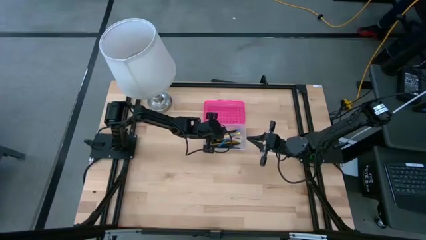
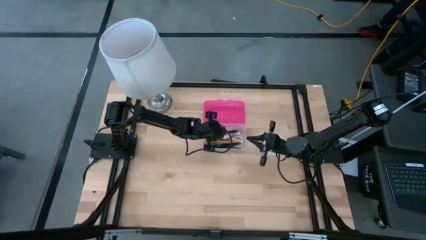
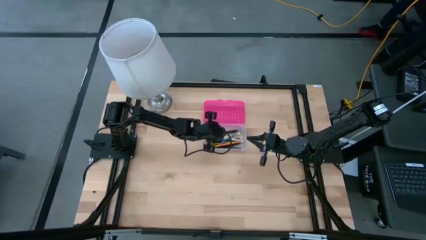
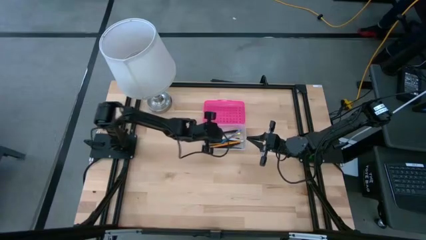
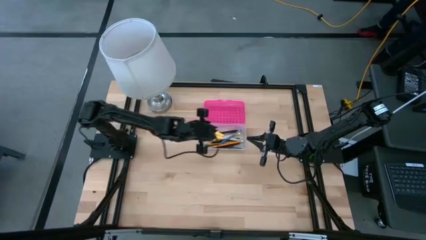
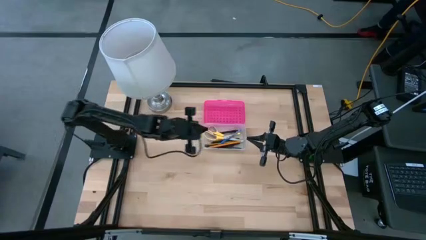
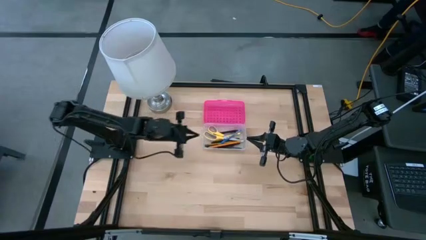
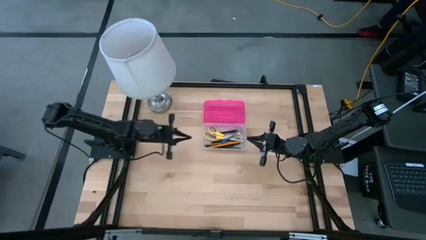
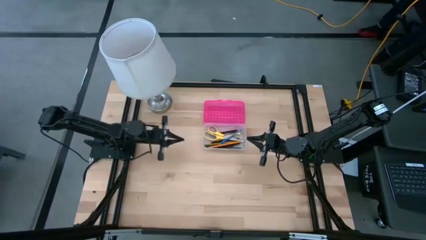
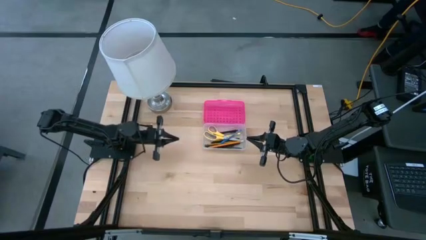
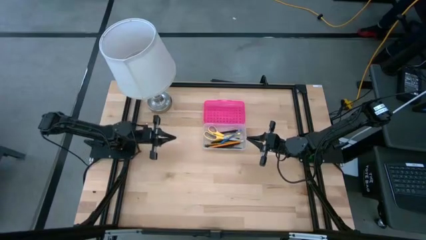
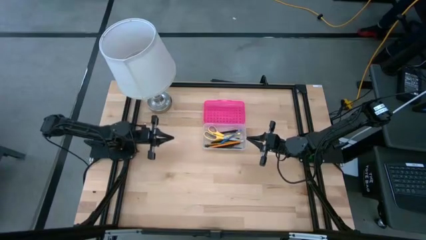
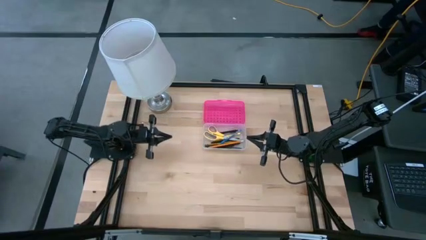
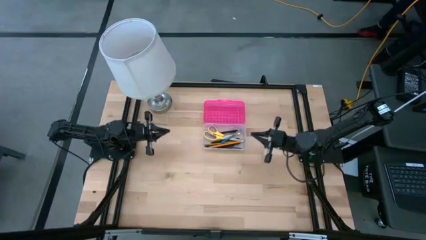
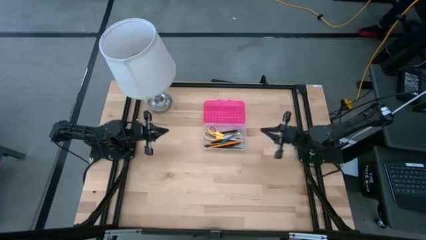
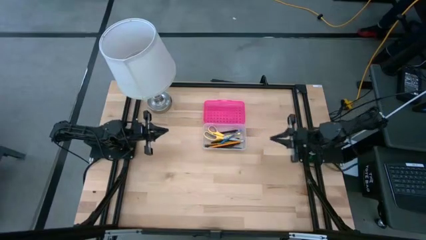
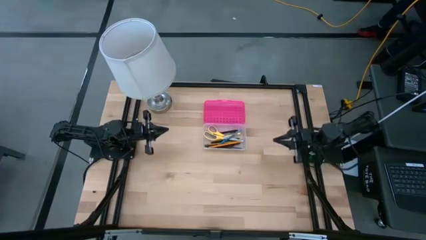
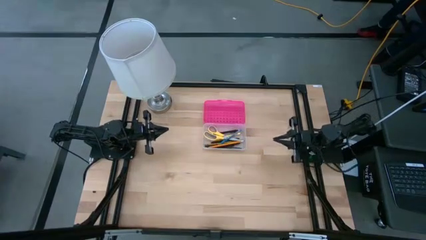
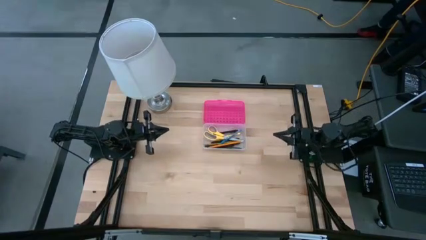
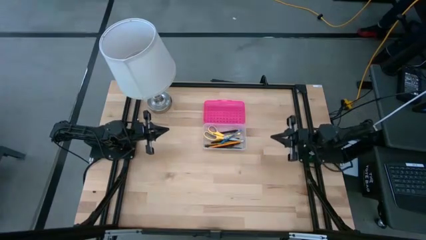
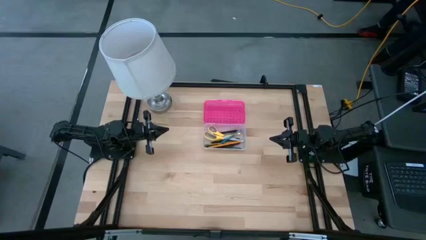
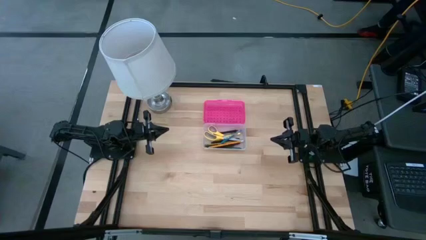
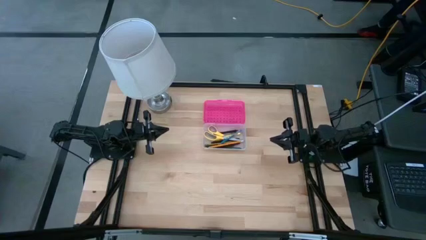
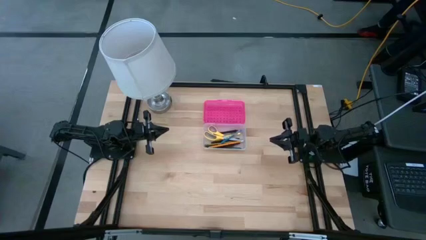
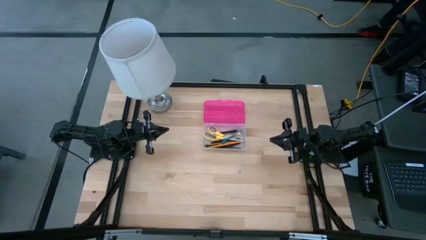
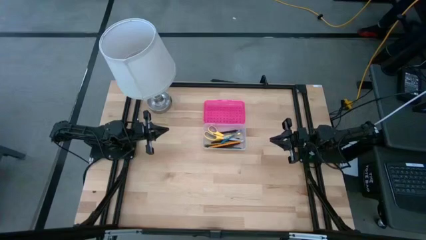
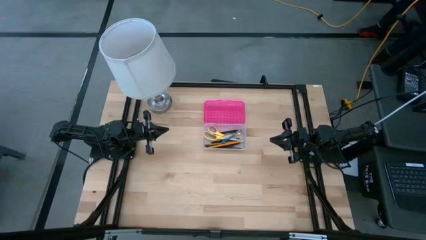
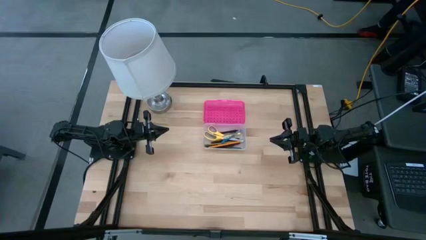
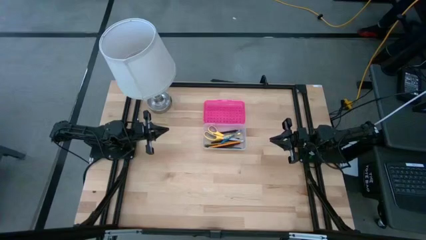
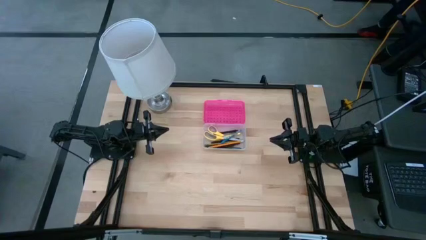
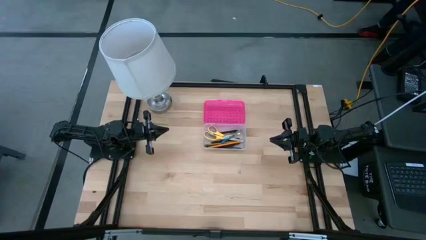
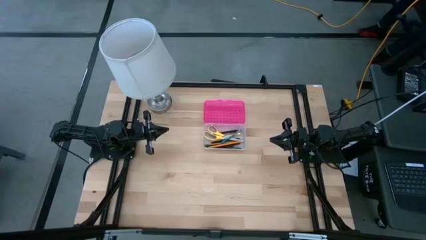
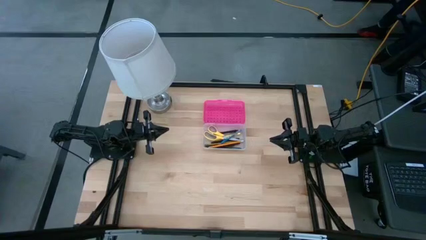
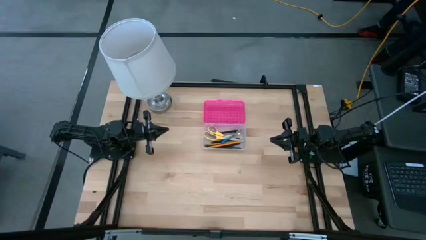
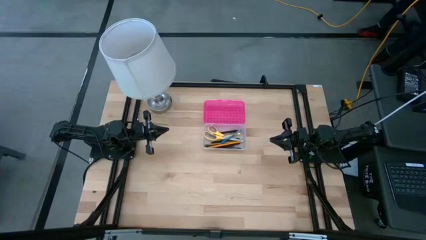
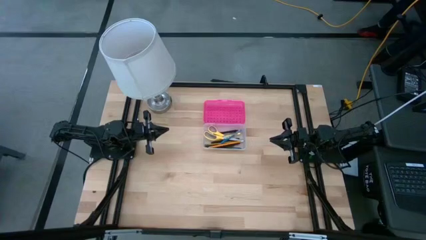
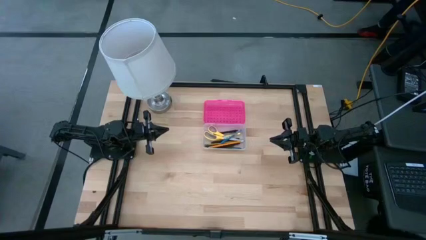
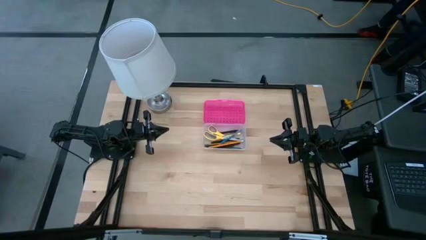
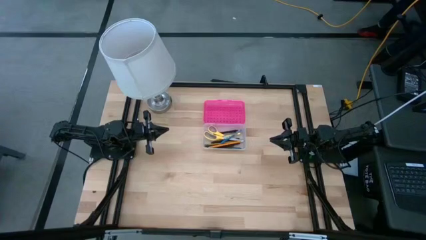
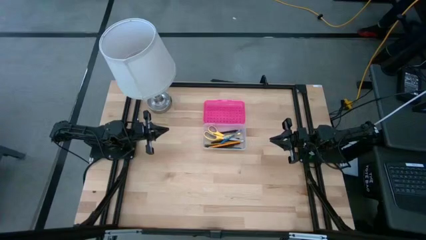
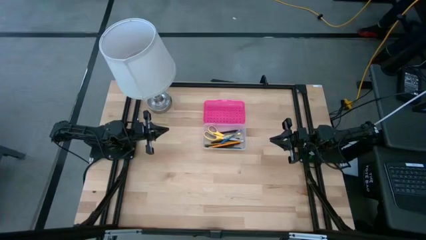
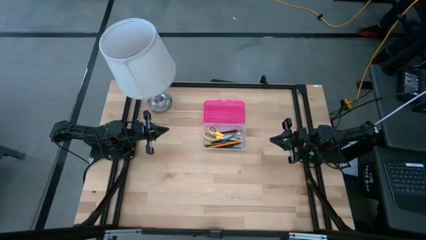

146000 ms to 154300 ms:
Task: Pick & place school supplies into a supply box
Return to Home Position

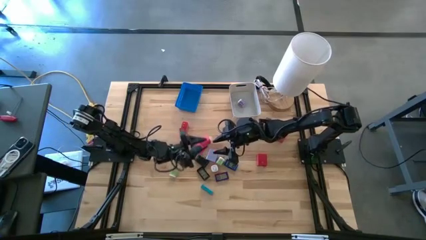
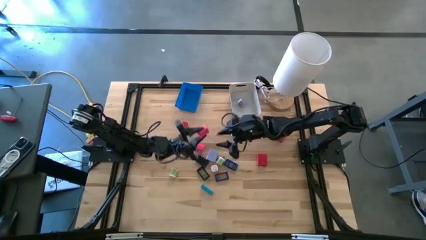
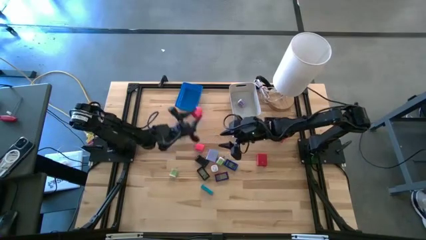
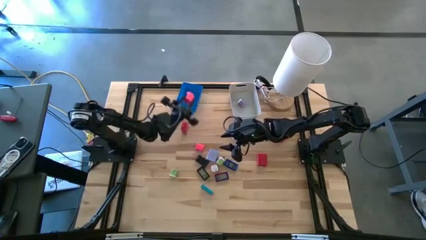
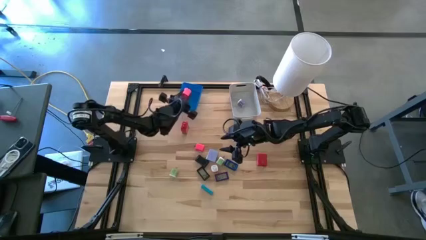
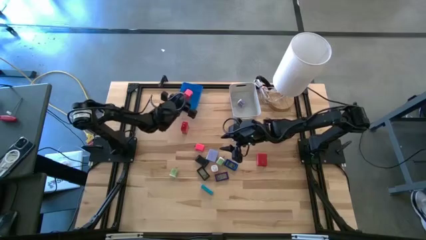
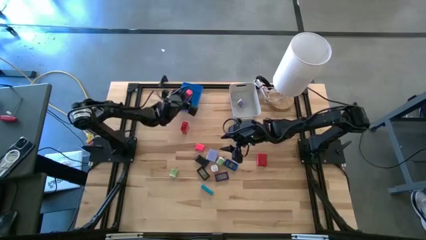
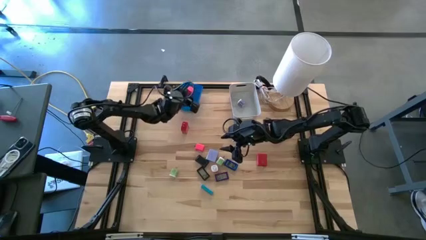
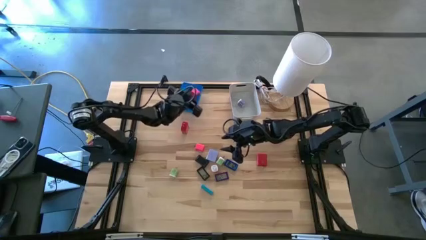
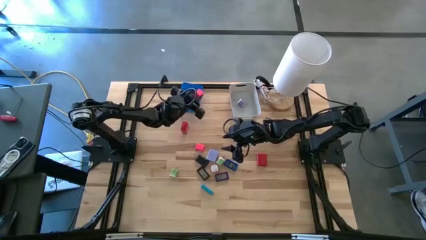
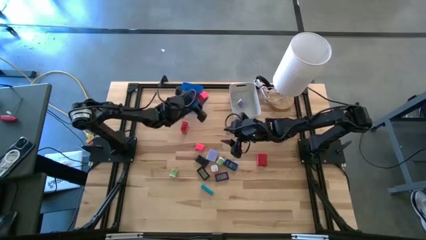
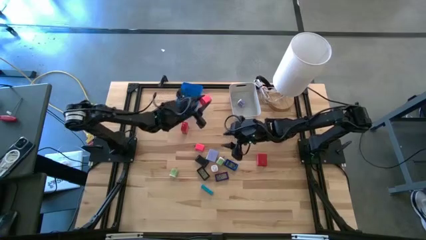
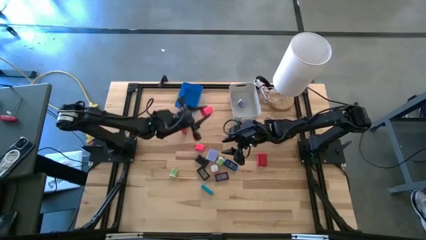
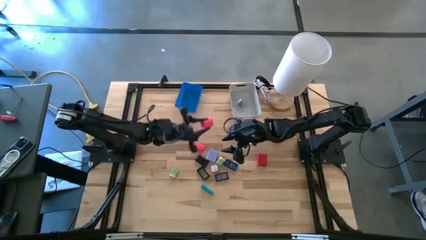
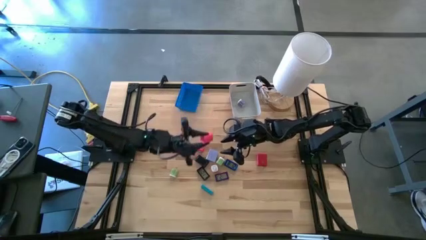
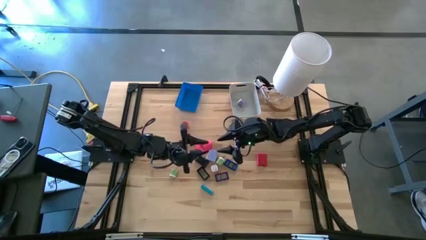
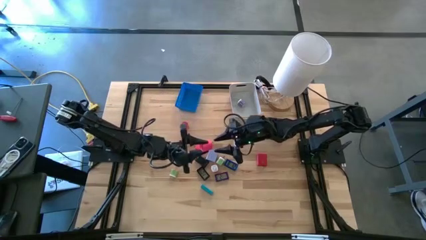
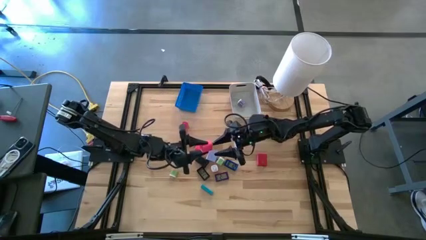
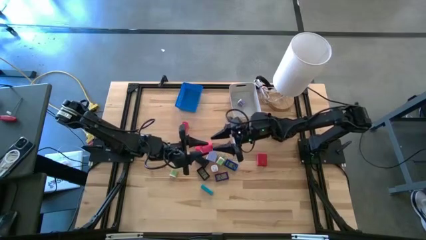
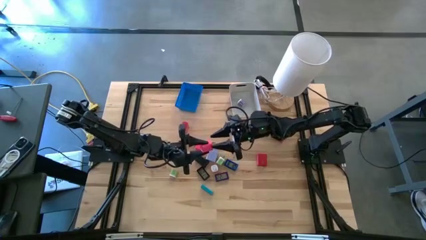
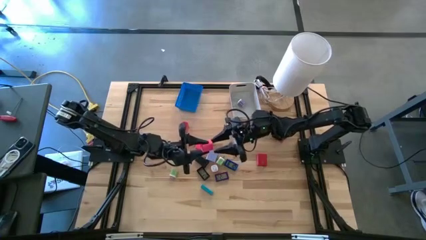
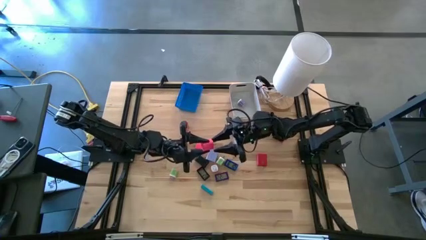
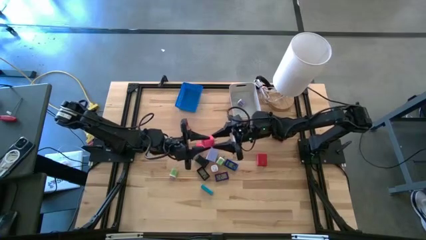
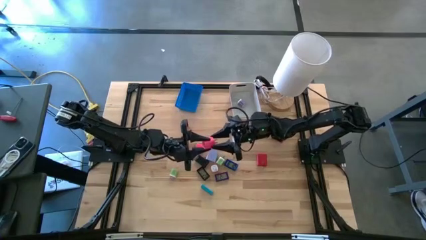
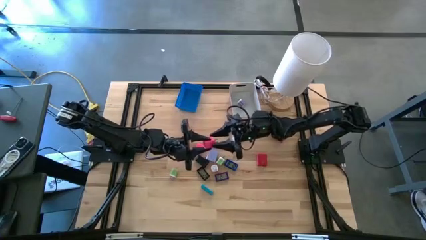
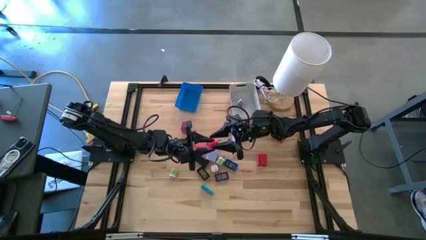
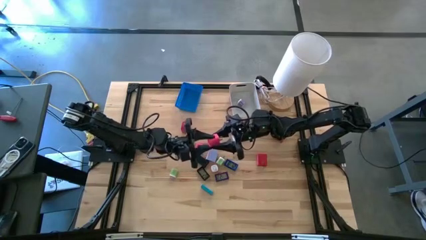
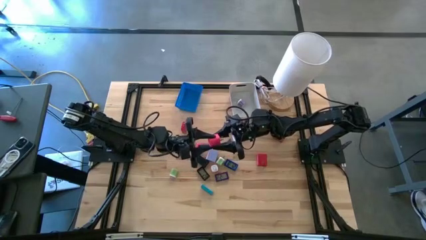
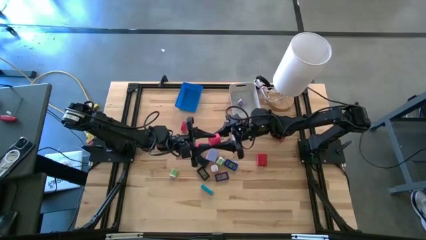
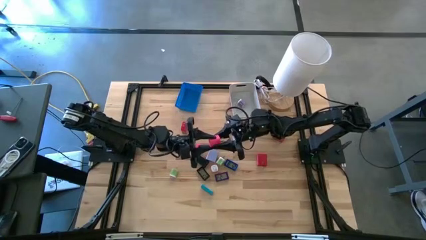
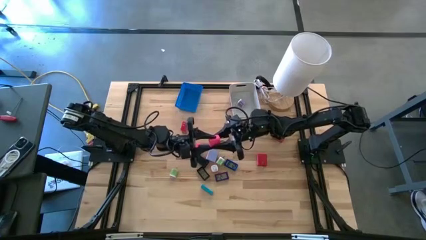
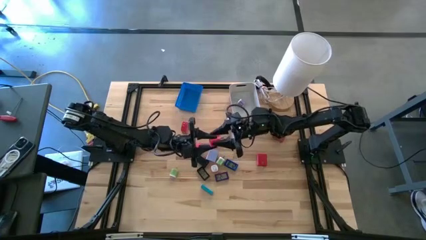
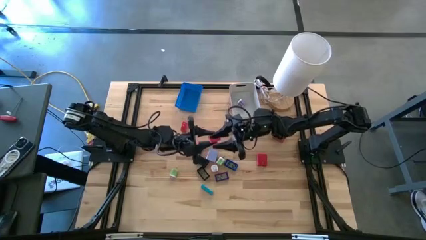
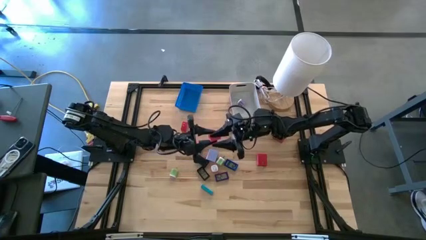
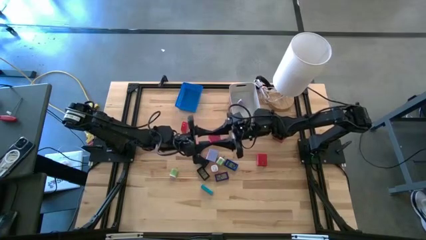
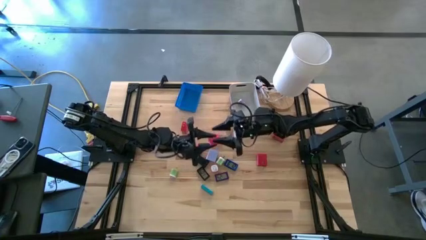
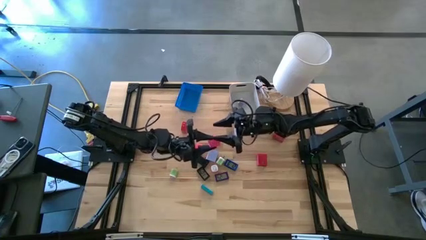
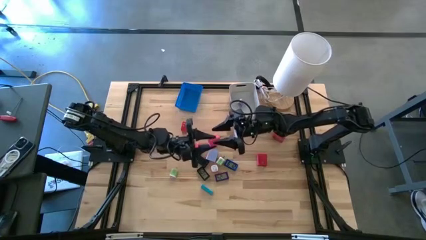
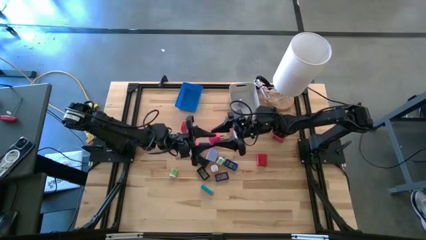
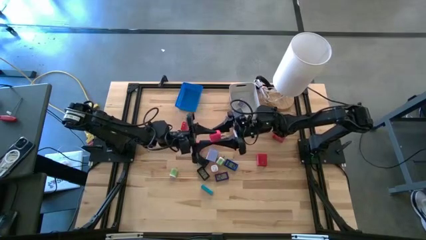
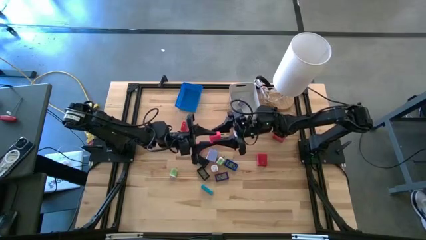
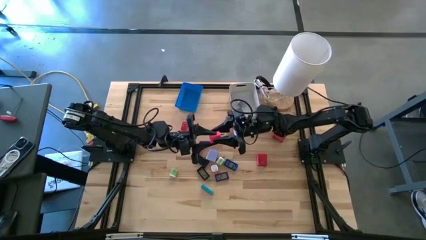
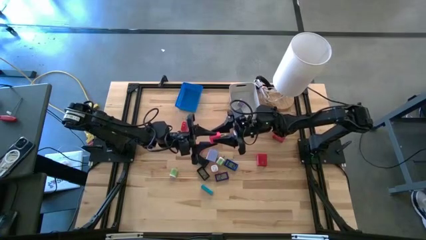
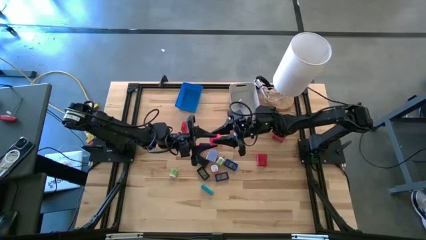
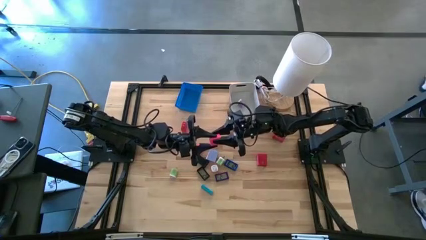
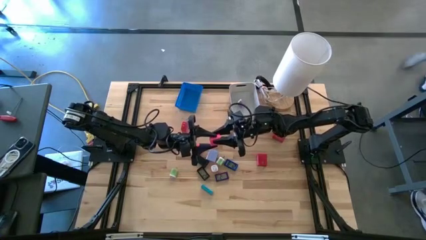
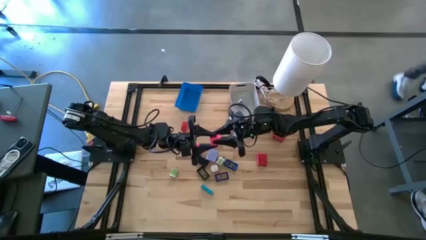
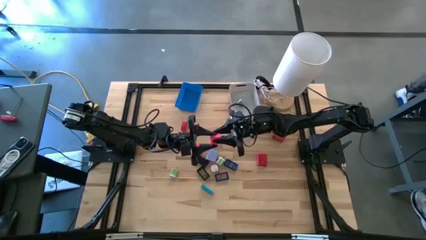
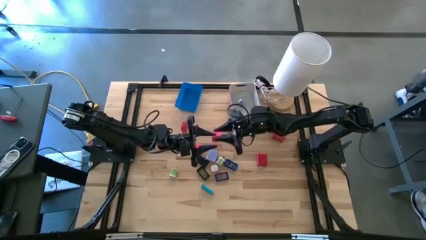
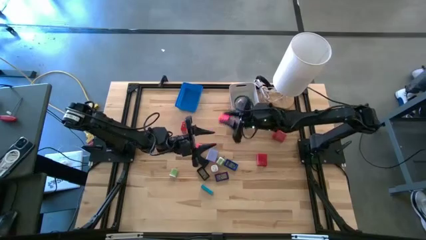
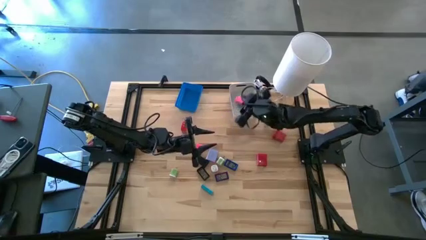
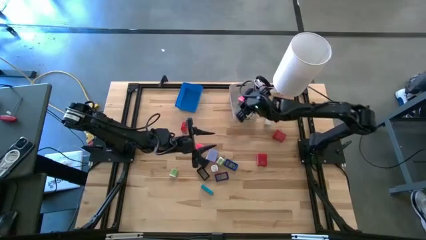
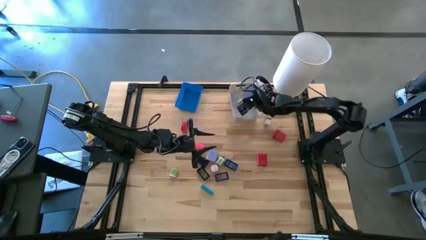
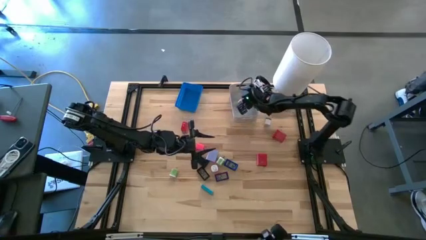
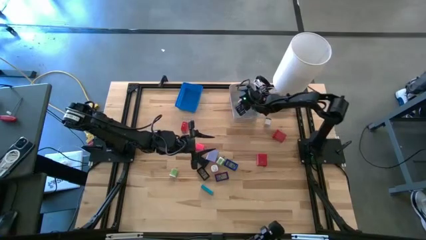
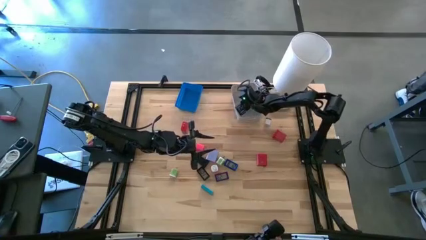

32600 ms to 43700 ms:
Task: Pick & Place Office items
Put the right pink charger adapter into the white bin
